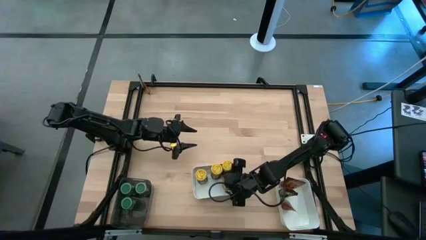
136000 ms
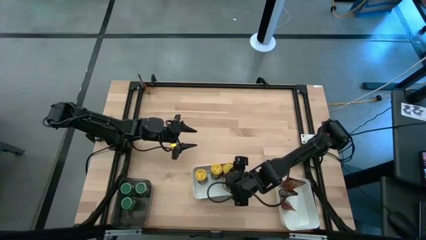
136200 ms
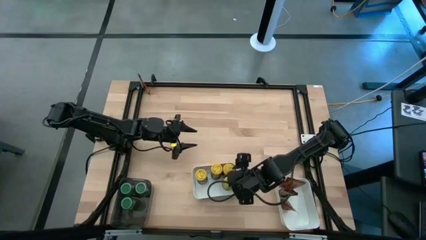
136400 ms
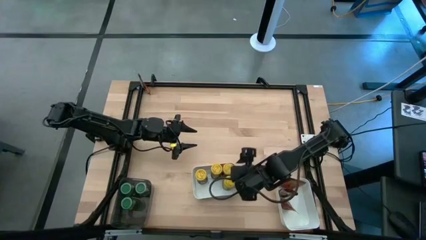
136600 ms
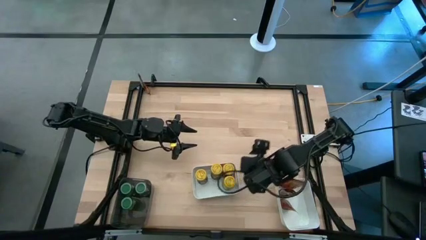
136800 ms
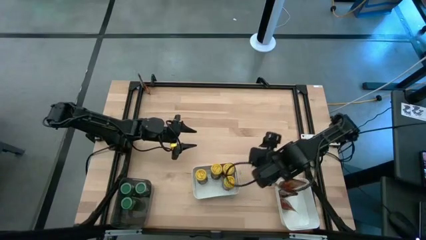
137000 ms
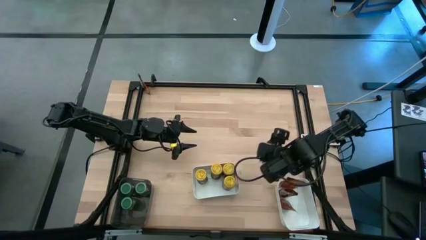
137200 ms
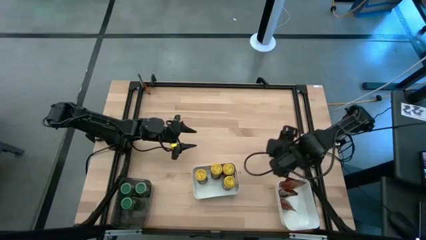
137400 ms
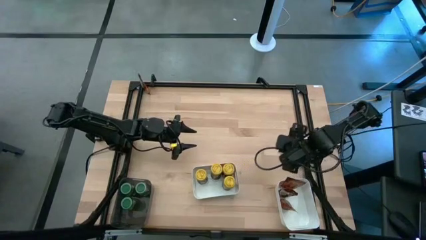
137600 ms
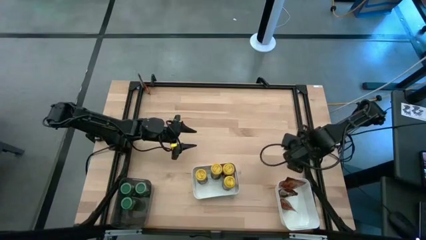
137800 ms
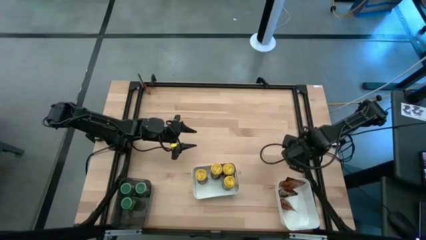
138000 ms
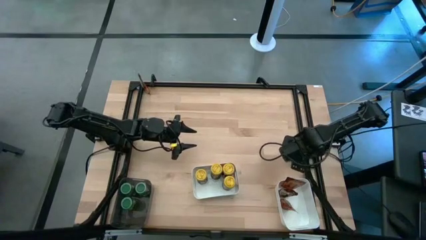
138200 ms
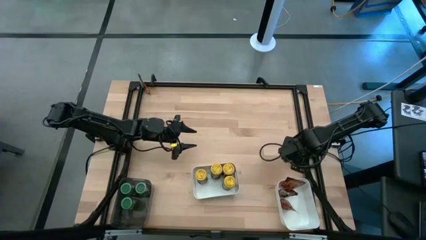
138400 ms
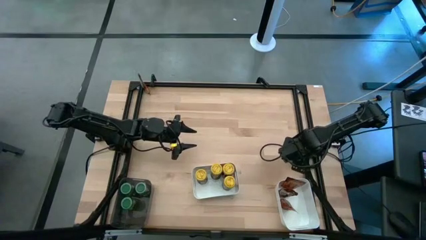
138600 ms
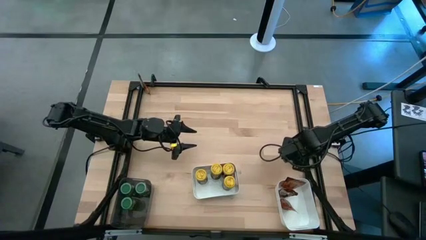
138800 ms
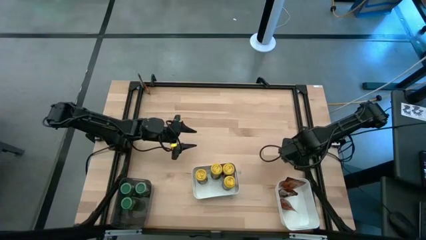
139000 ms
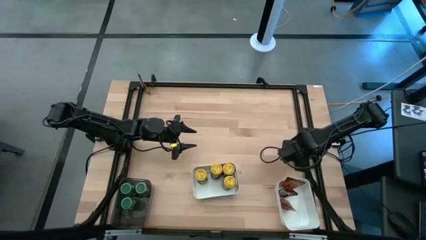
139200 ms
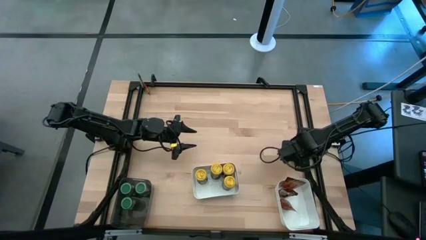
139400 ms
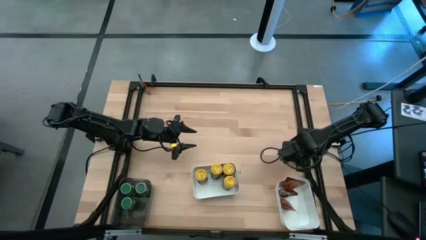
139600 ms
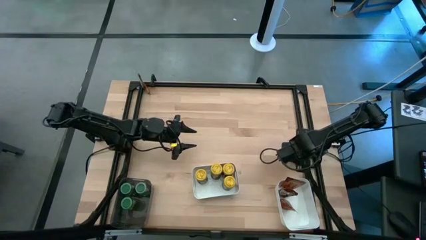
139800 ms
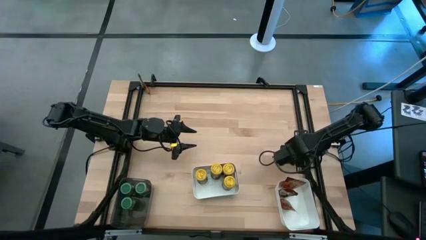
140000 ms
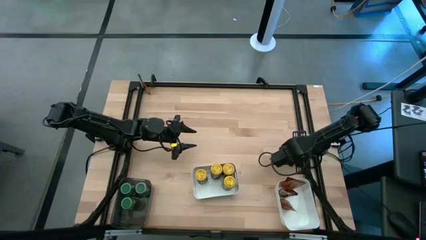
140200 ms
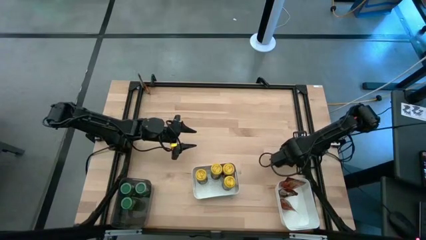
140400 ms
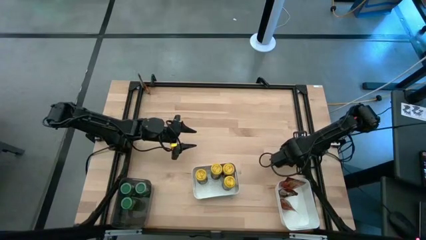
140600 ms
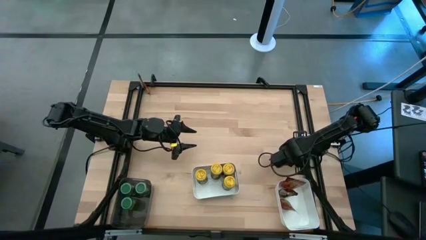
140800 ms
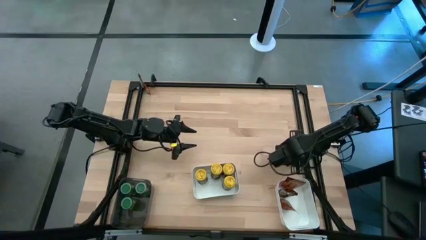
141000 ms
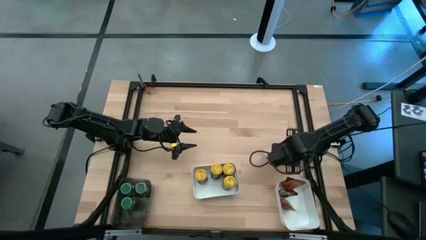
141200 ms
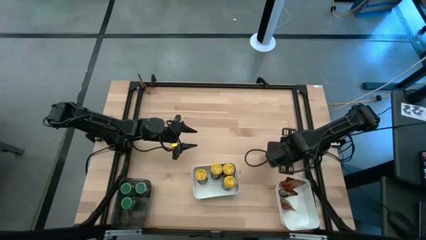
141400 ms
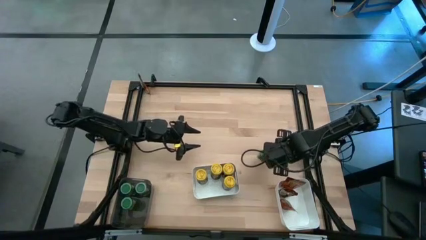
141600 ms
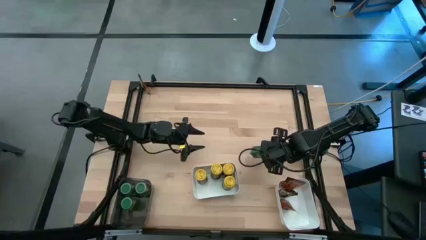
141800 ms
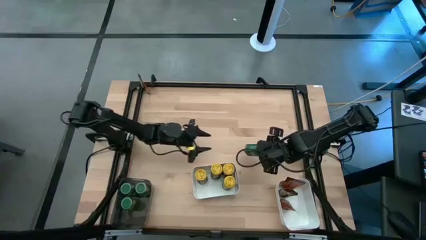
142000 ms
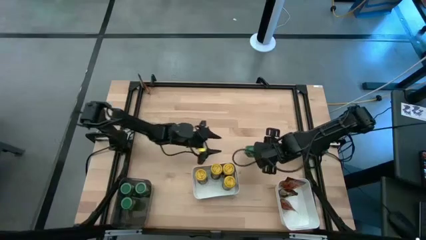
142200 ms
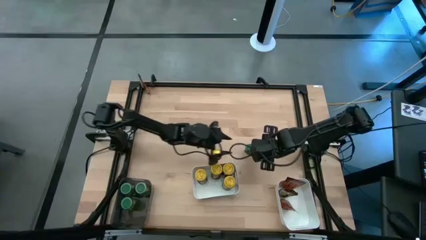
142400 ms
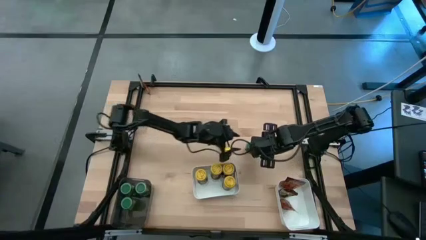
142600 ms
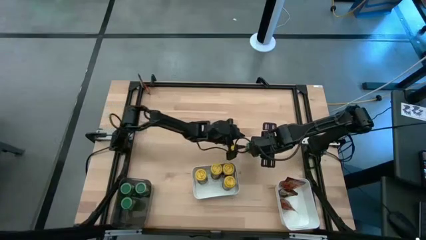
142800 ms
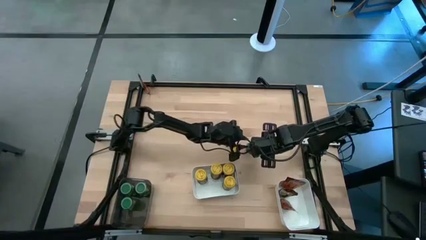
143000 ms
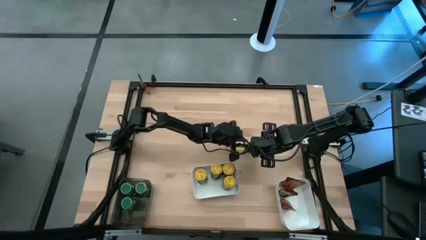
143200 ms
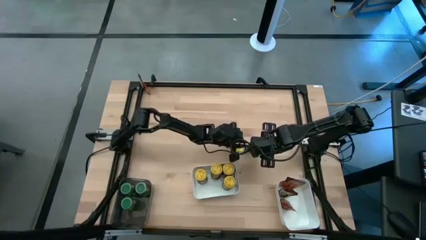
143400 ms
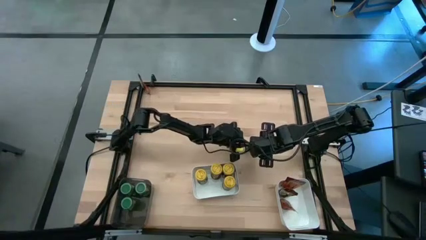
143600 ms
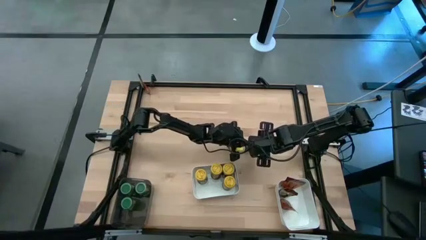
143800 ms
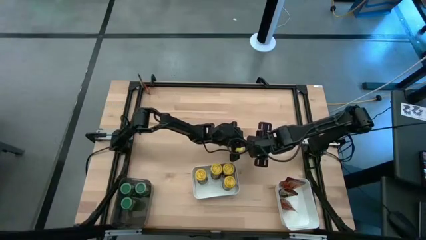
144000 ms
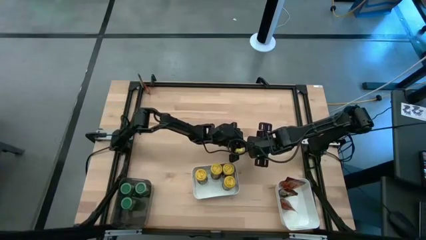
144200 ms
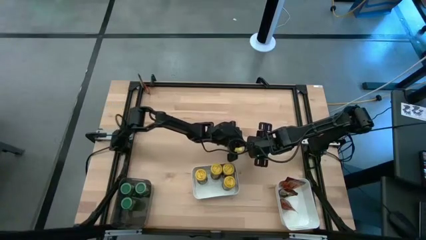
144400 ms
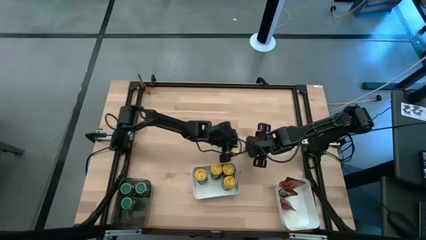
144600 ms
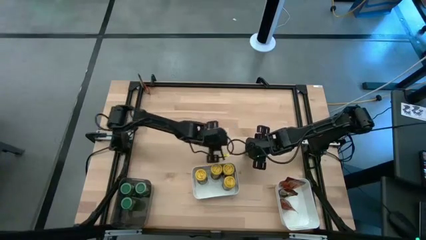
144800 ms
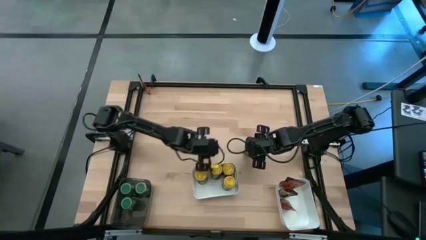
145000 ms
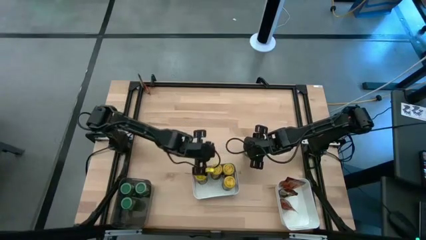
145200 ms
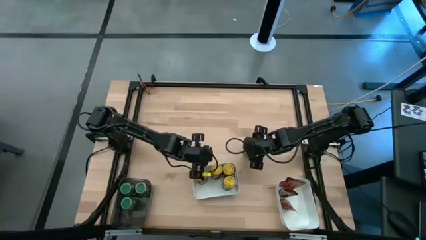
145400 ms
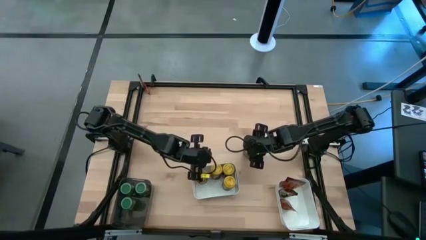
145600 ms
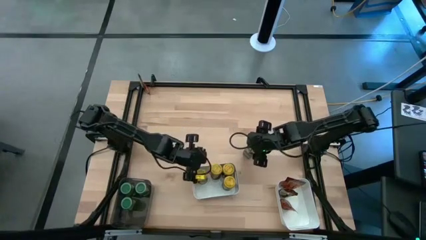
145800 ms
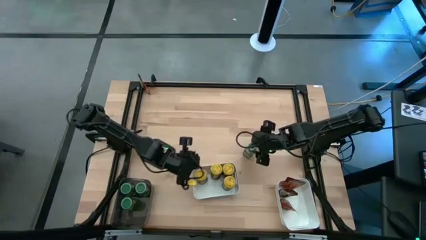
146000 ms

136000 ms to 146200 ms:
Task: Sort spices by type
Put the green seasoning bottle into the black bin

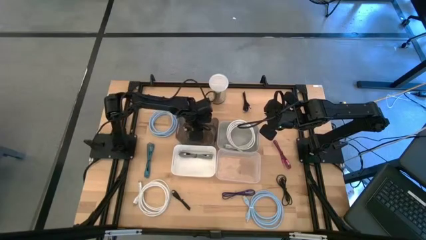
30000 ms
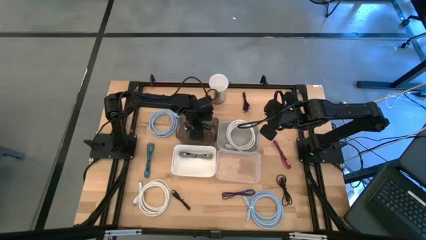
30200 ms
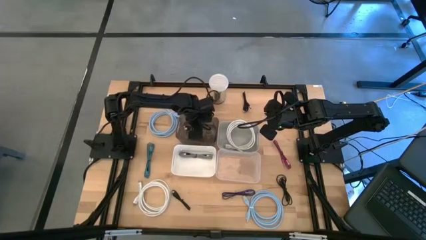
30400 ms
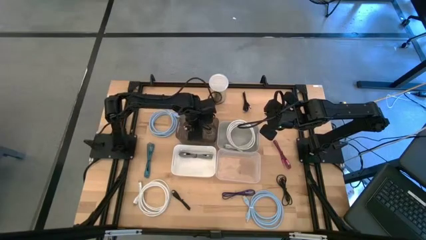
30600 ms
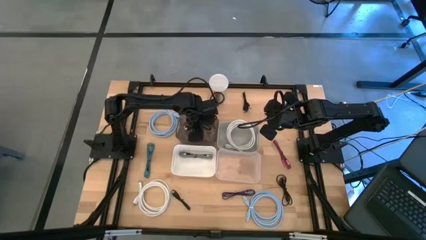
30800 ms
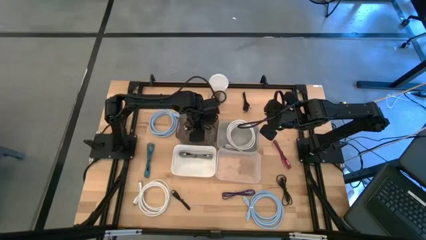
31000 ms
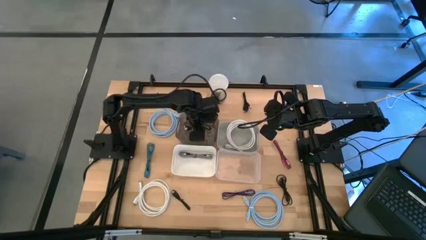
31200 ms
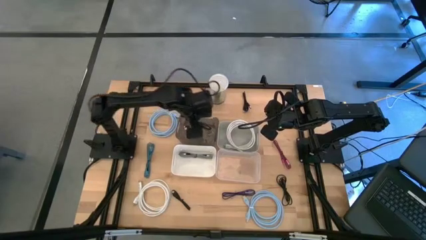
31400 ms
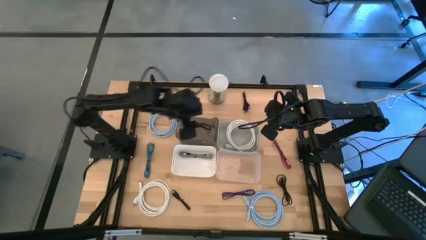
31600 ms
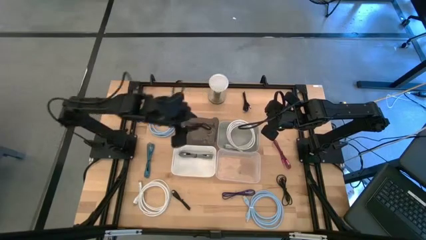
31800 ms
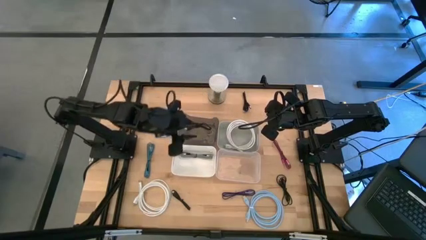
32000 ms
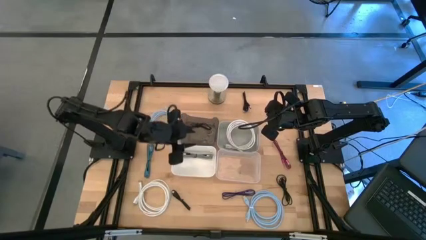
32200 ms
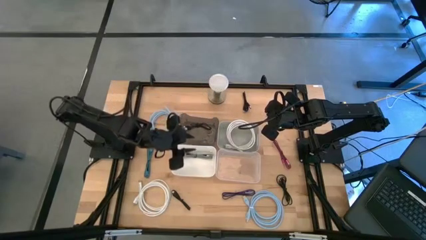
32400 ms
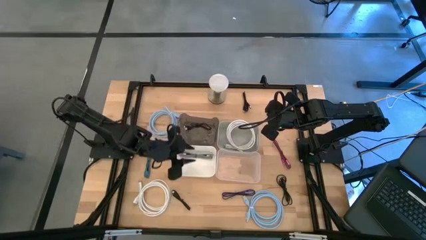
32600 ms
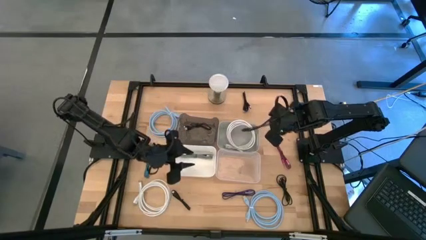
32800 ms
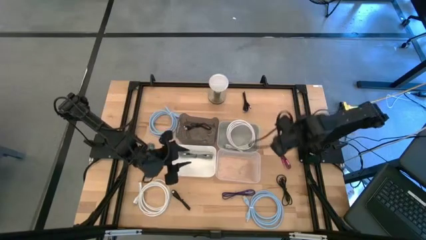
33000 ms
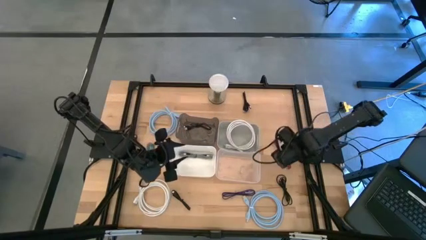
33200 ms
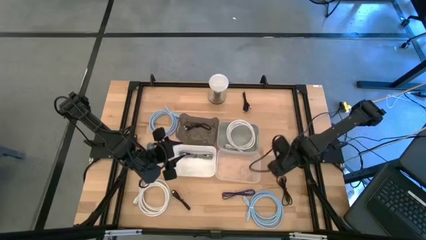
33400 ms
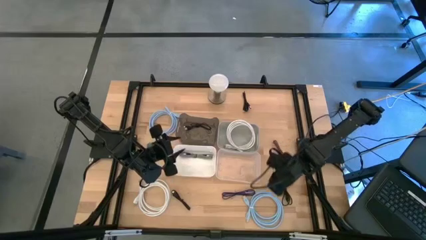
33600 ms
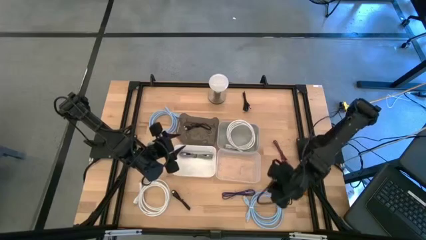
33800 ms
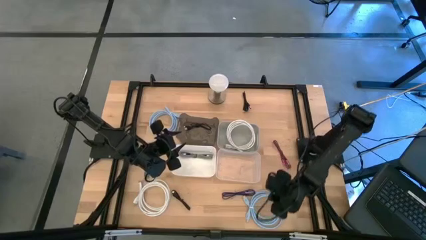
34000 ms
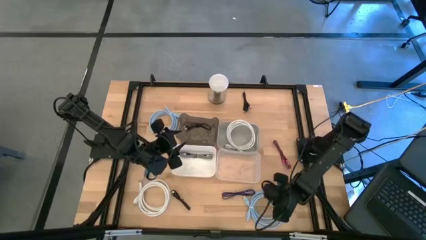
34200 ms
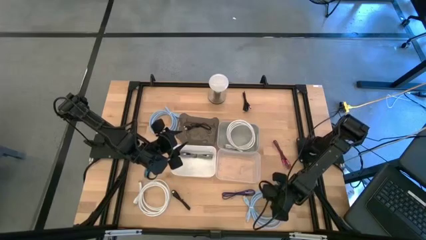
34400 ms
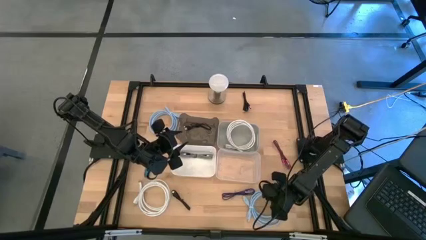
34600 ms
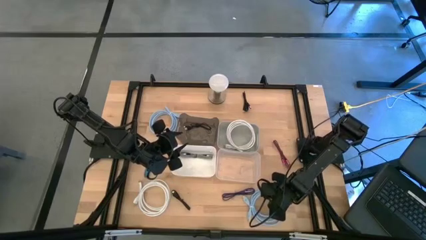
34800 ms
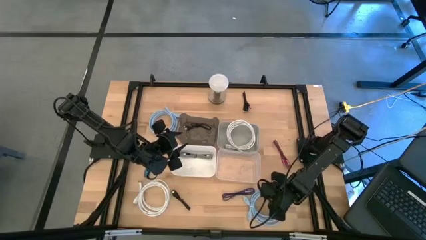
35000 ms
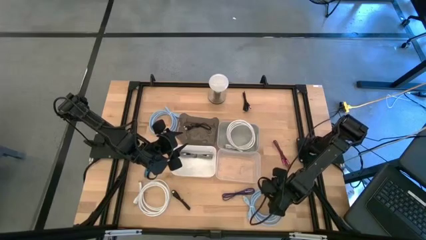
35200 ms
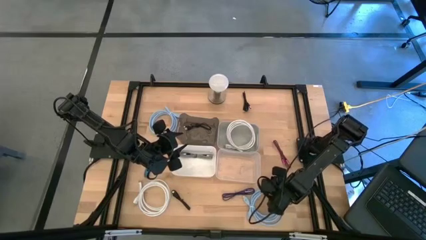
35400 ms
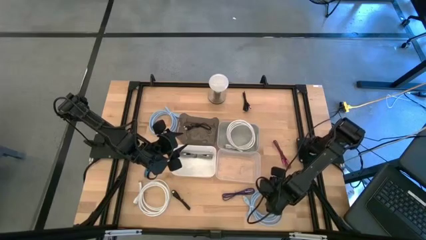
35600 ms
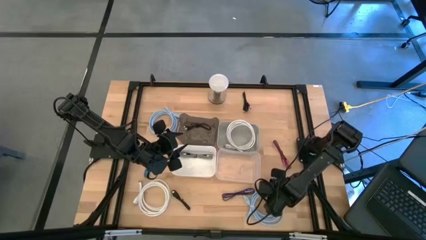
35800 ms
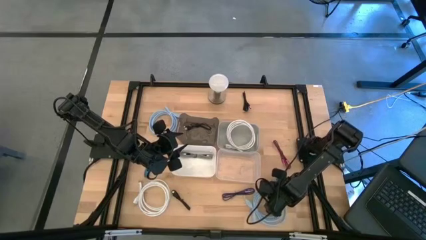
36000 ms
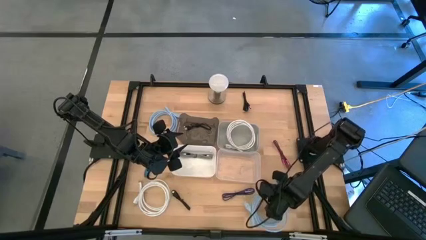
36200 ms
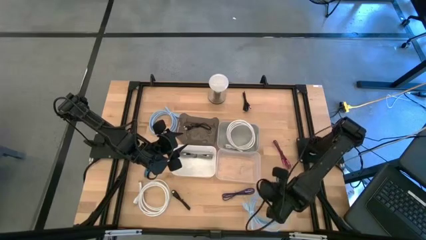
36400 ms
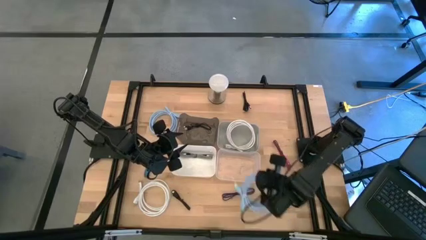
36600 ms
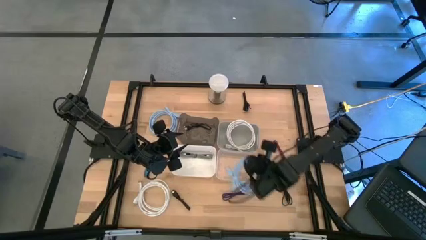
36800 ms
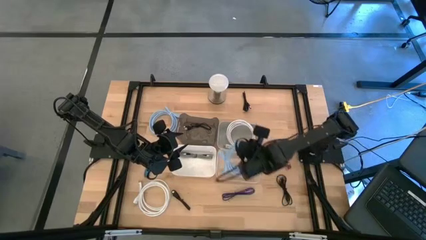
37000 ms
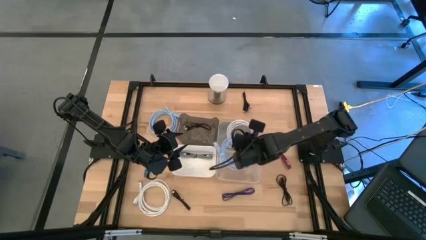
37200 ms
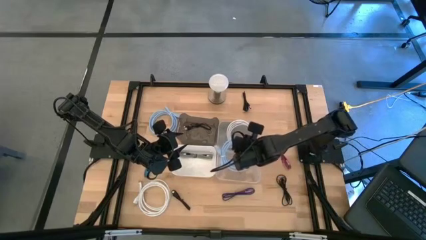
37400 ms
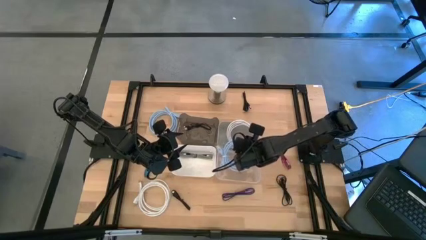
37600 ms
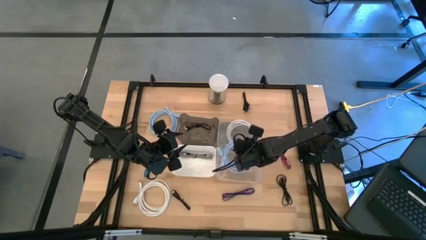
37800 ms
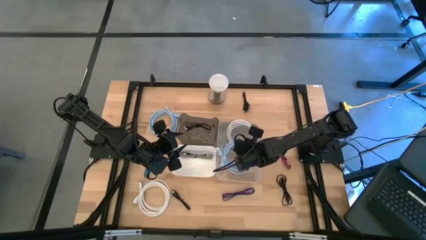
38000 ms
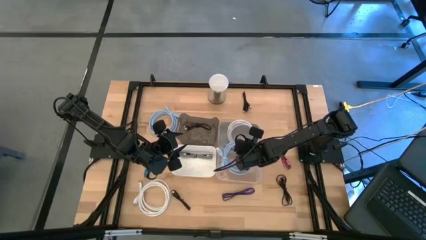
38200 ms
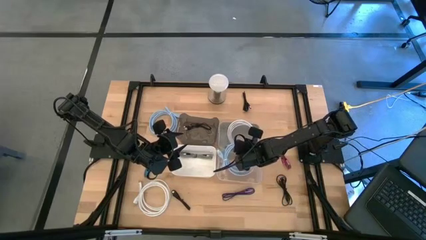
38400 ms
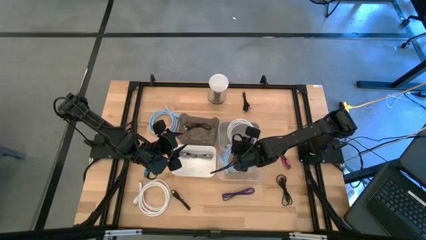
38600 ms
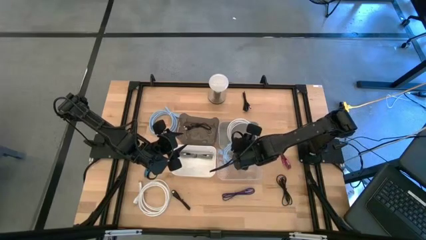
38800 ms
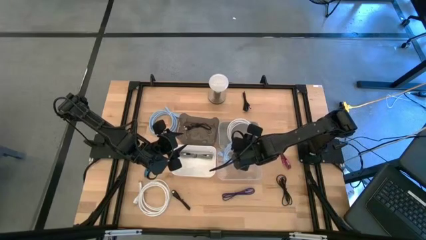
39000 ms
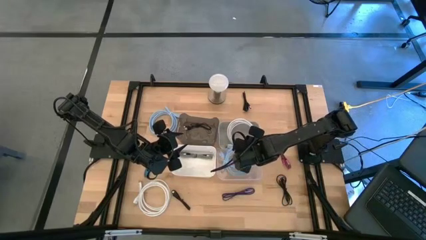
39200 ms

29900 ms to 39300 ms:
Task: Pick & Place USB Port
Put the bottom blue usb cable into the transparent bin
